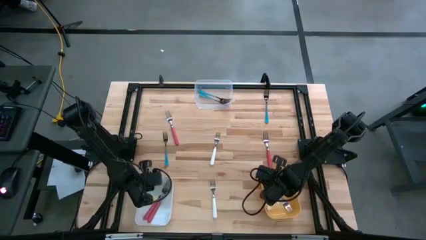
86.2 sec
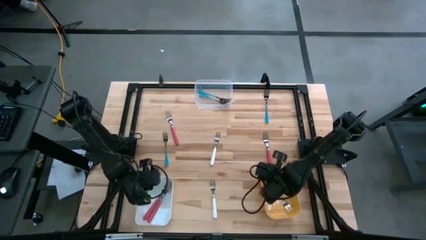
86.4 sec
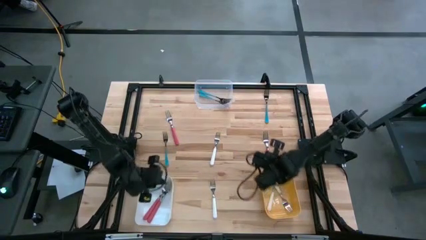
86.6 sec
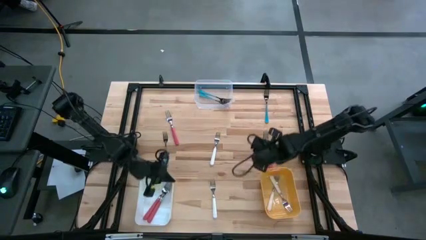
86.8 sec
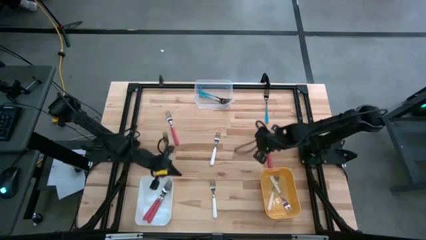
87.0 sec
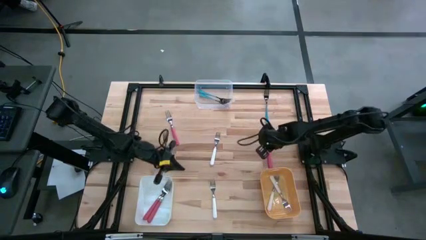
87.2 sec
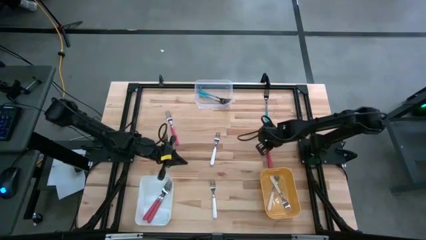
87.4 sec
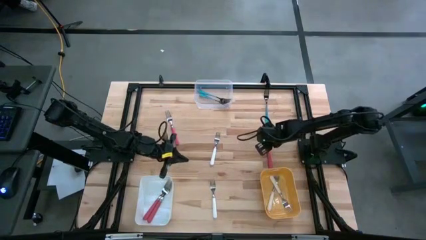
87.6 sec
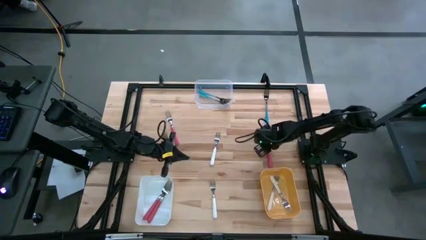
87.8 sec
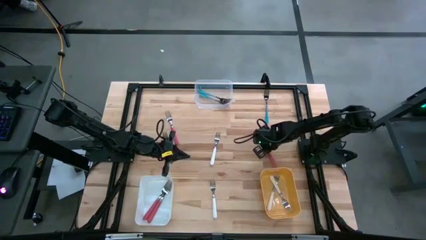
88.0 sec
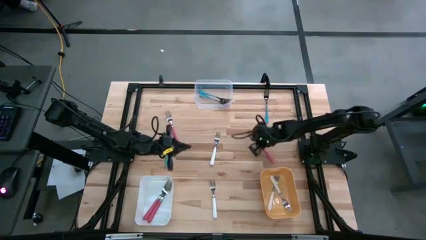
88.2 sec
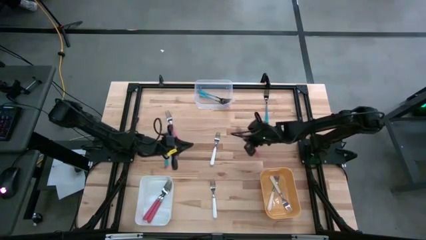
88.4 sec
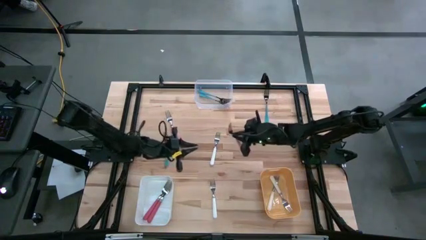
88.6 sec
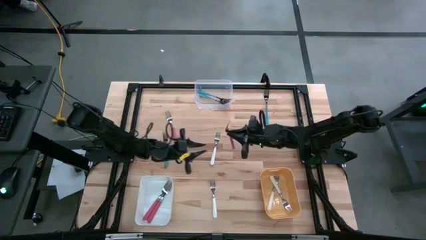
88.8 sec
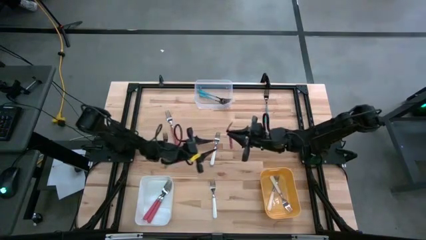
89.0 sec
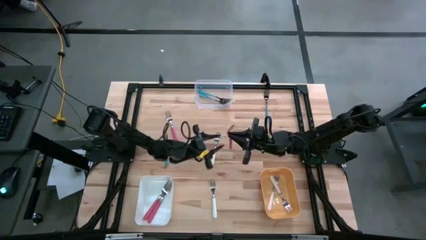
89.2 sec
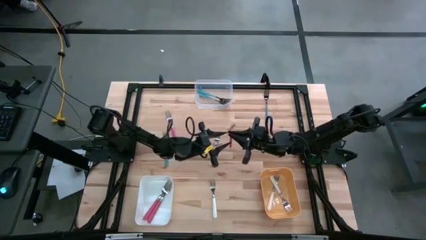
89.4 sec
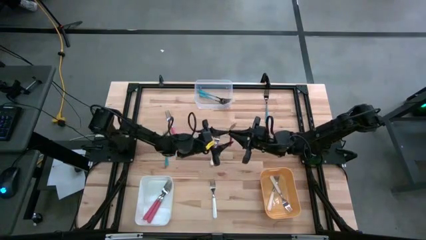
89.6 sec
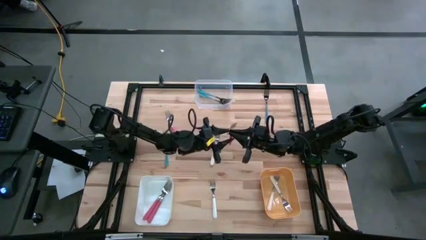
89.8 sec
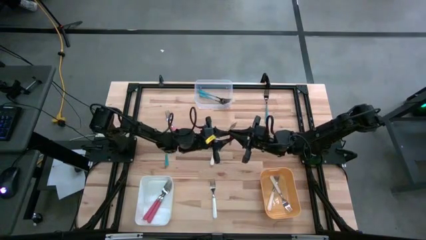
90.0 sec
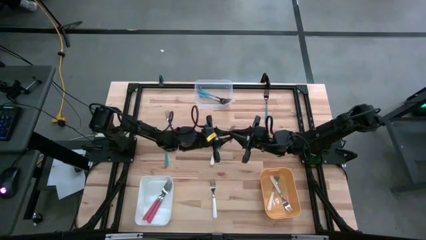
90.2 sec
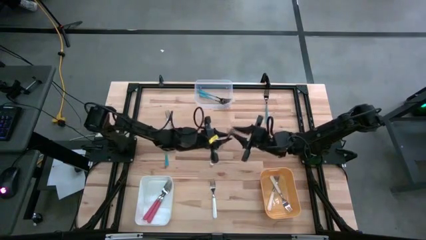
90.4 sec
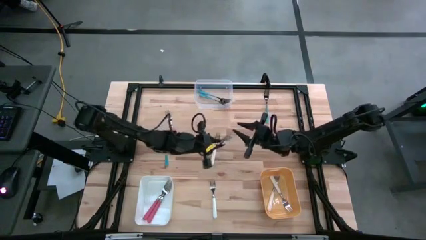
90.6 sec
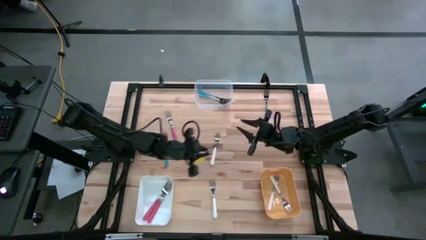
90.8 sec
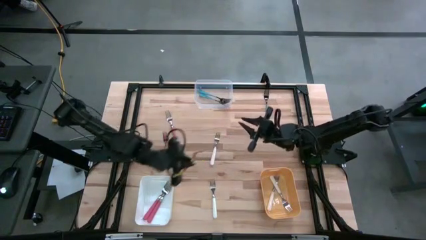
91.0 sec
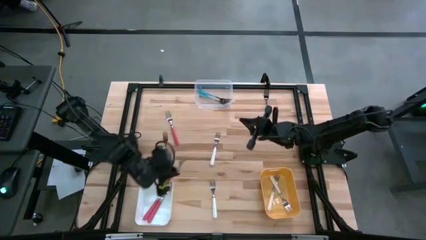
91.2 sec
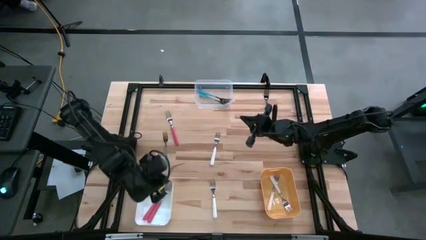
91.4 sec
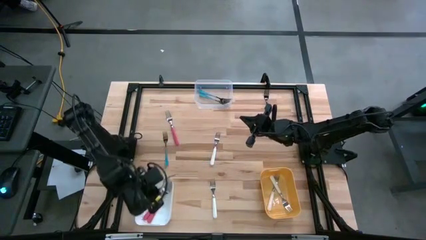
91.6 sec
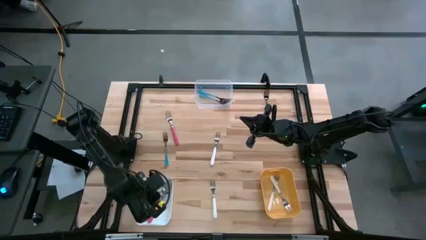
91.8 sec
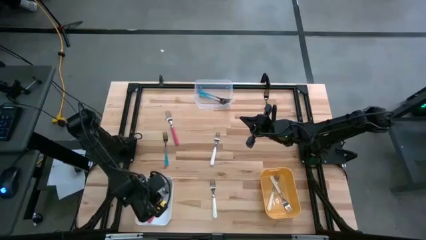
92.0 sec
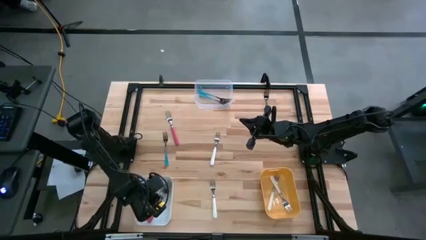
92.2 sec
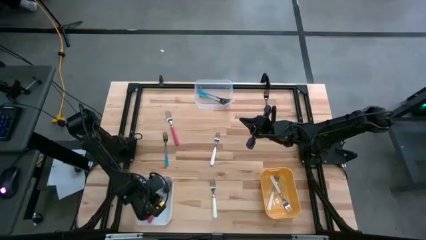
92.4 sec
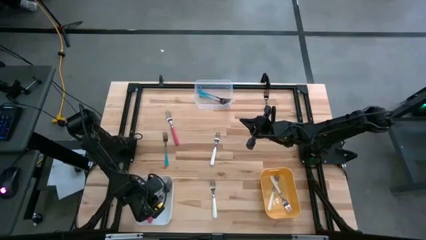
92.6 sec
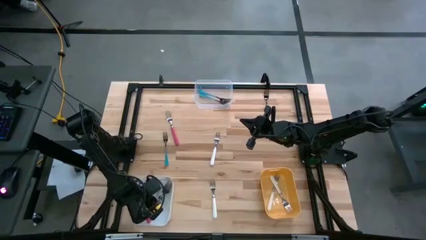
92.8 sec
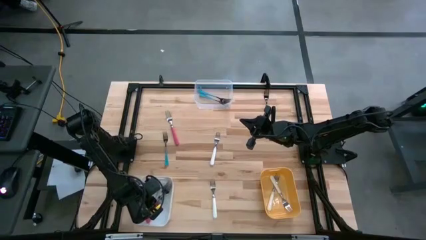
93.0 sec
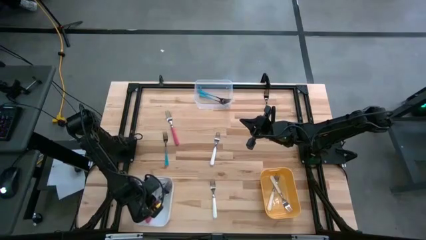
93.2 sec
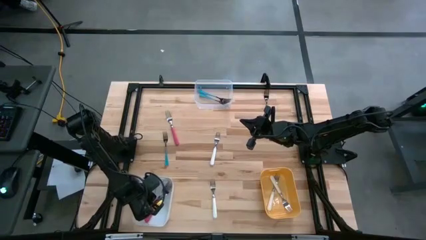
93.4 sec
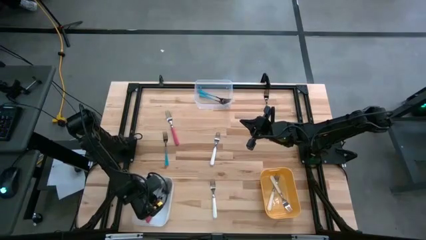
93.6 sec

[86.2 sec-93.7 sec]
Task: Sort silverware by color (type)
Put the red fork into the white bin

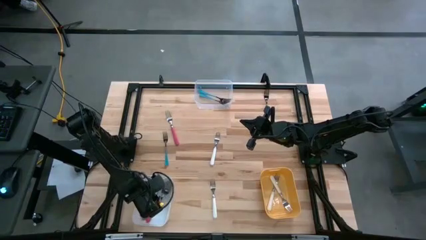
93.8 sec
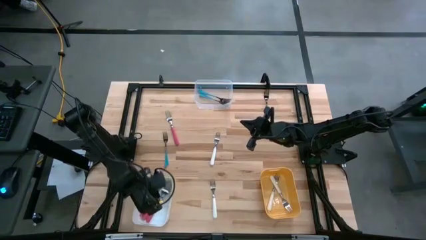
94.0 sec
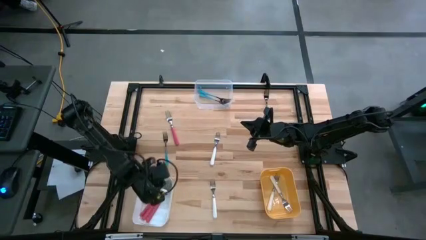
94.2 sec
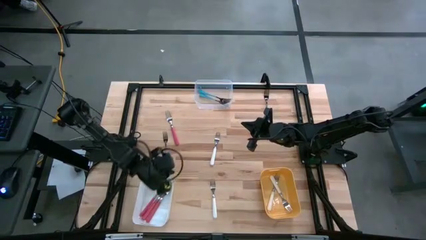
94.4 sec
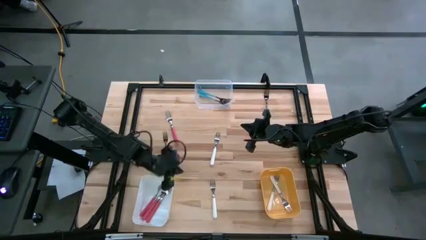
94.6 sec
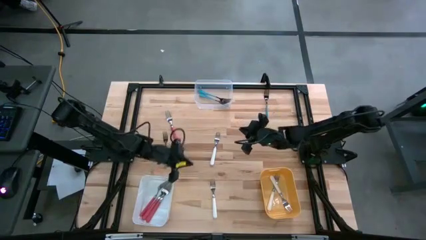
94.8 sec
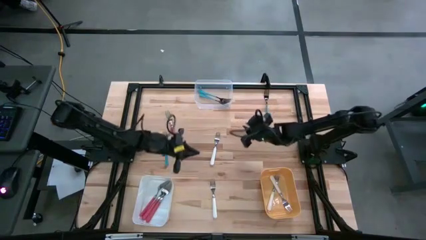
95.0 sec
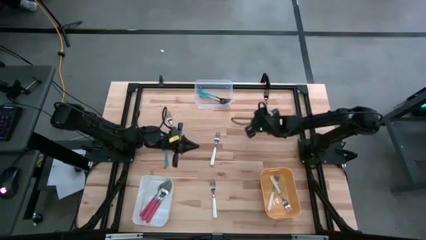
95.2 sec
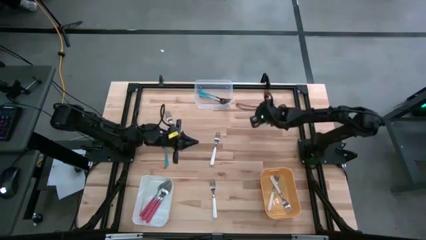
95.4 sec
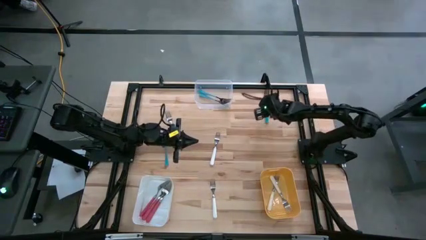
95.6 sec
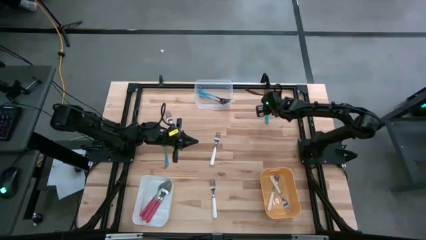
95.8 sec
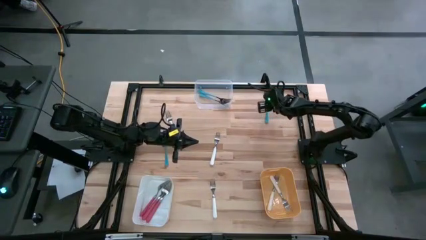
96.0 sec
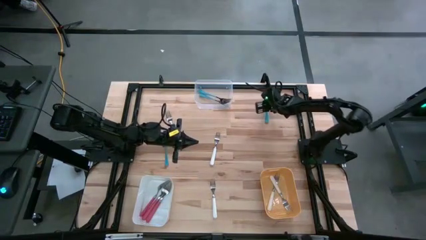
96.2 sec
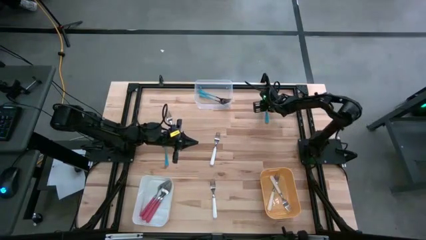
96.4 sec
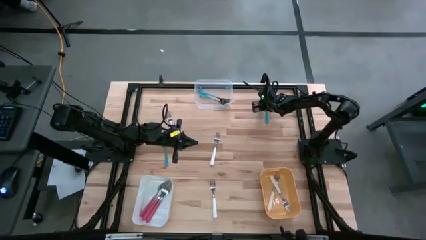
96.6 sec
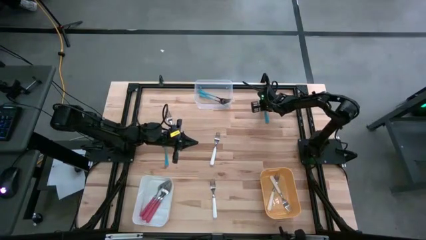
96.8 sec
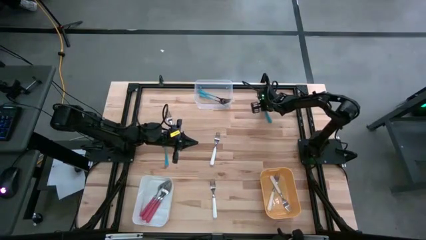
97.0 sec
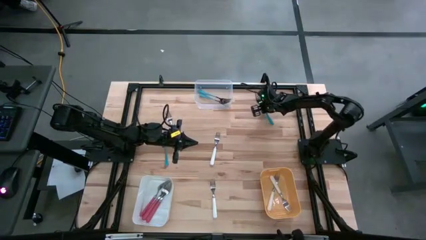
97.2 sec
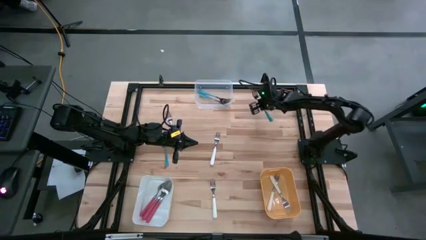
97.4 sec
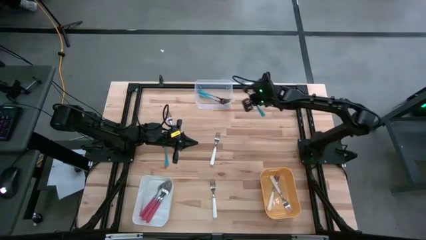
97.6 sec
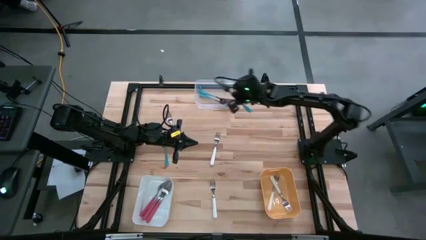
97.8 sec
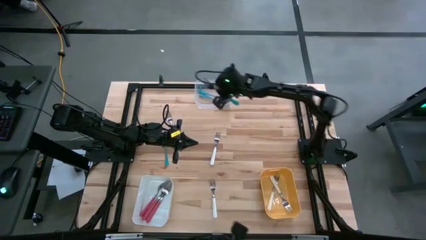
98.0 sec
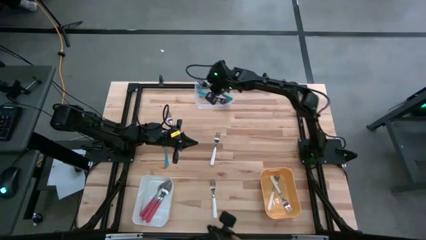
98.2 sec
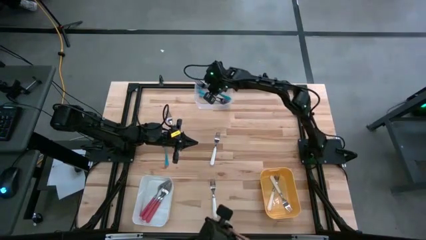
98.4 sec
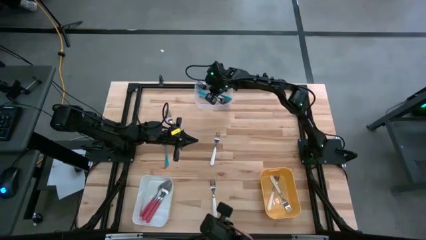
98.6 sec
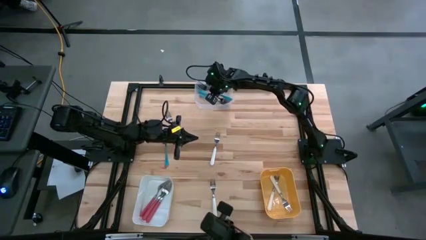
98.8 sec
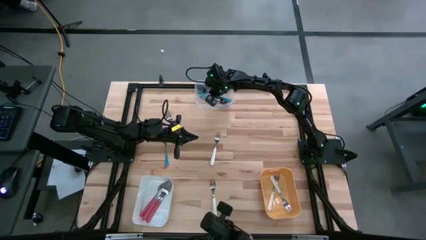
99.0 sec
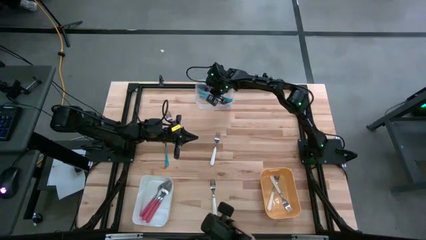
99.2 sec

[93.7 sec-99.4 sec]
Put the blue fork into the transparent bin

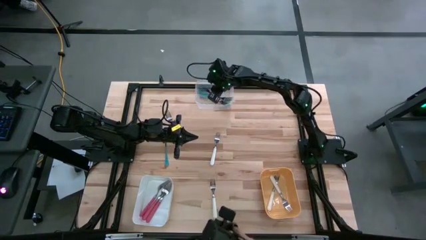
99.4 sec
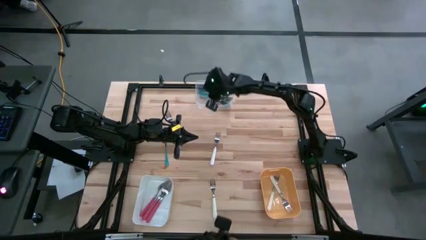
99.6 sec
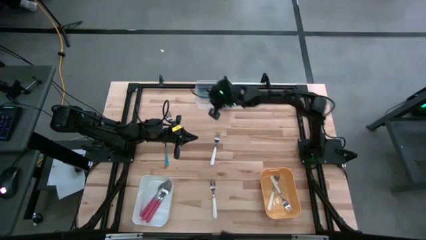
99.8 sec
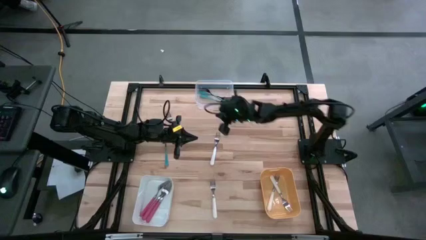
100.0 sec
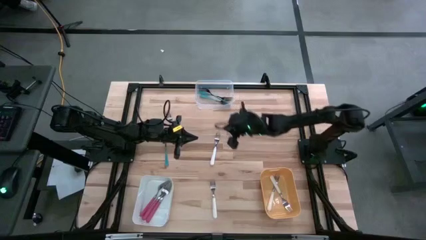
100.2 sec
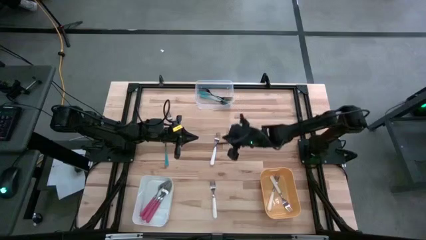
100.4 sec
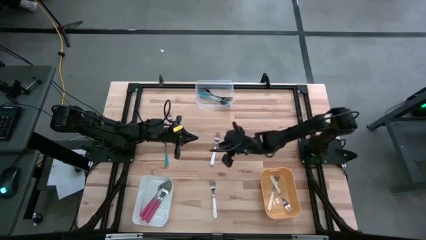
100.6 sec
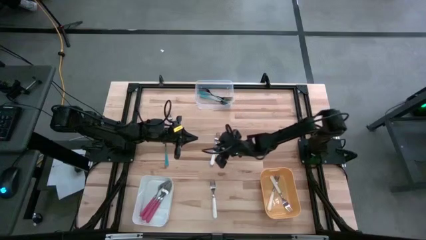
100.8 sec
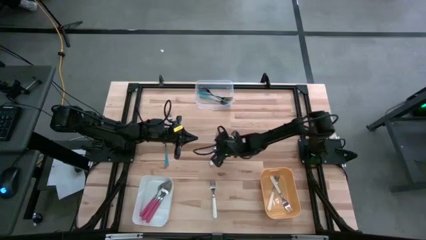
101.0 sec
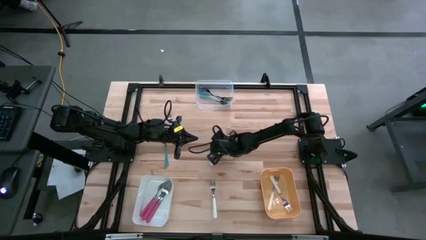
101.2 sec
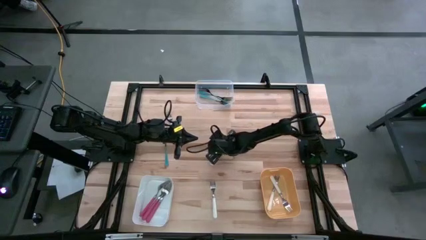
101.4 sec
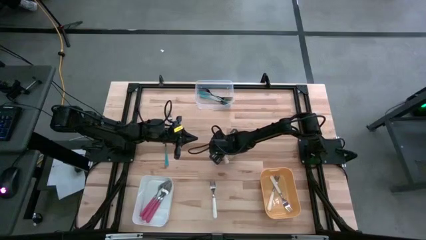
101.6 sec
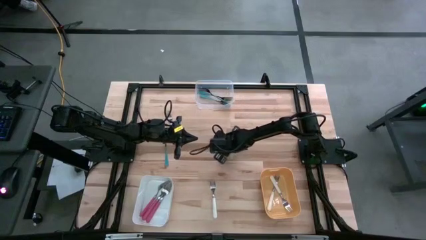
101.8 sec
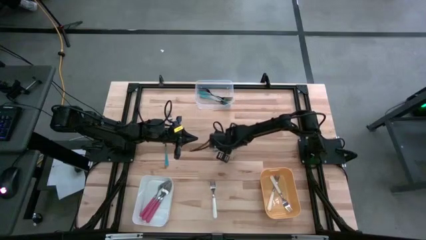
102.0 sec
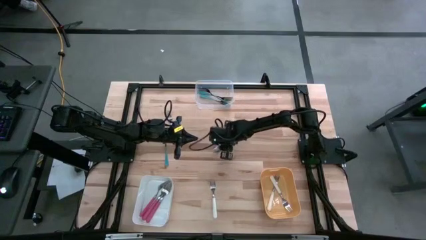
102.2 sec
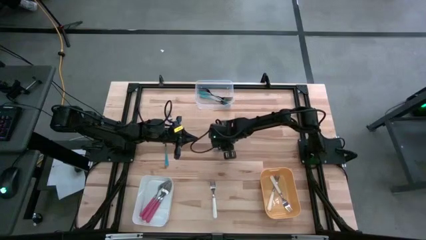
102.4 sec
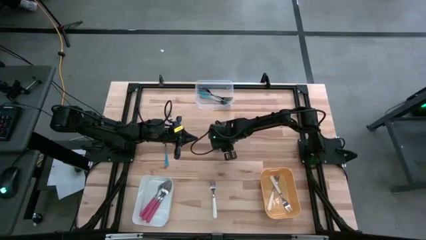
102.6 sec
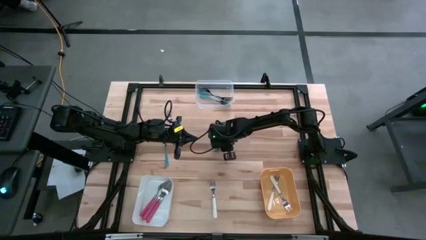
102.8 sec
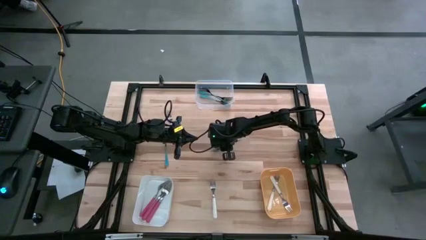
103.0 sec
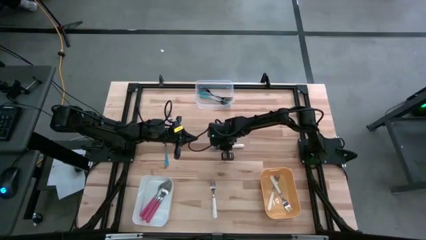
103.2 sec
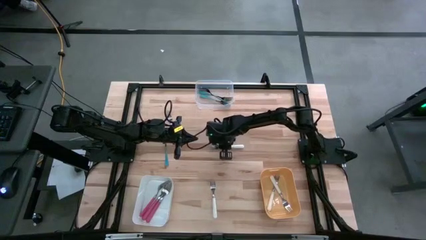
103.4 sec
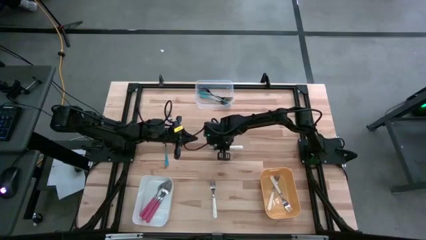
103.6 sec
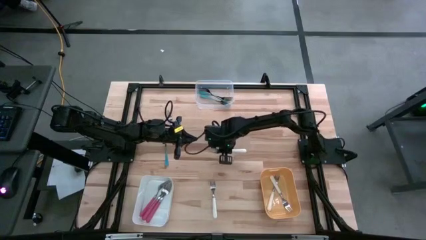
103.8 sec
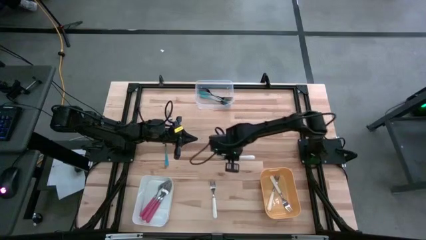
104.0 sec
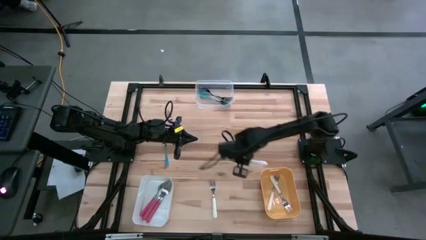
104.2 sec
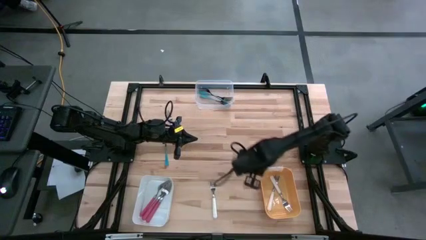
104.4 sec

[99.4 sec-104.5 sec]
Put the white fork into the yellow bin
